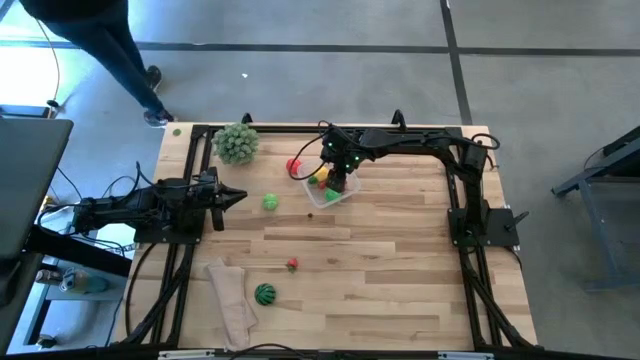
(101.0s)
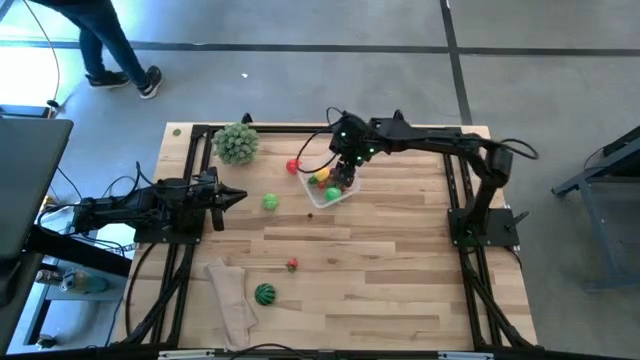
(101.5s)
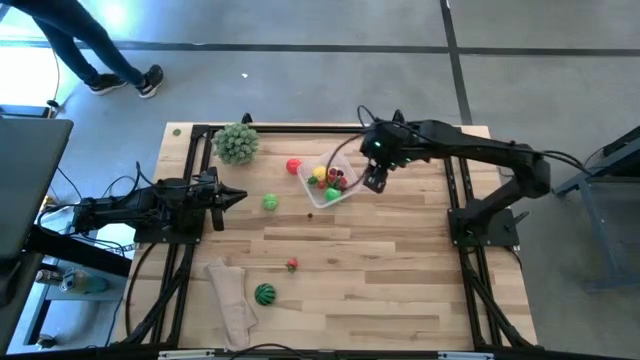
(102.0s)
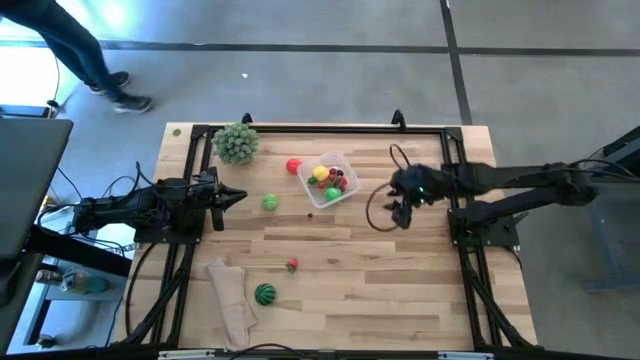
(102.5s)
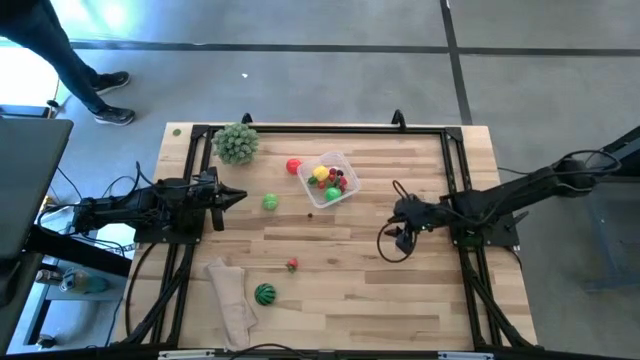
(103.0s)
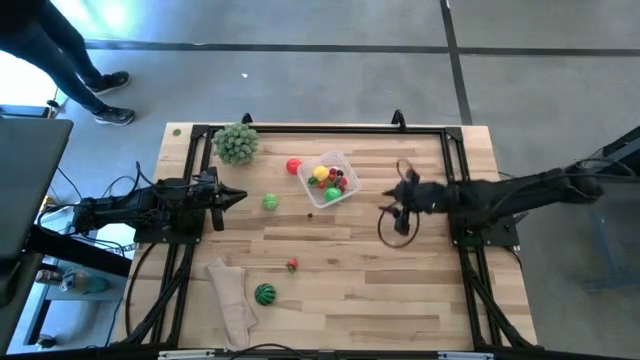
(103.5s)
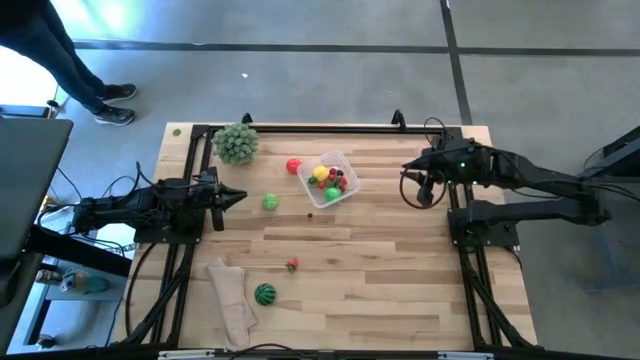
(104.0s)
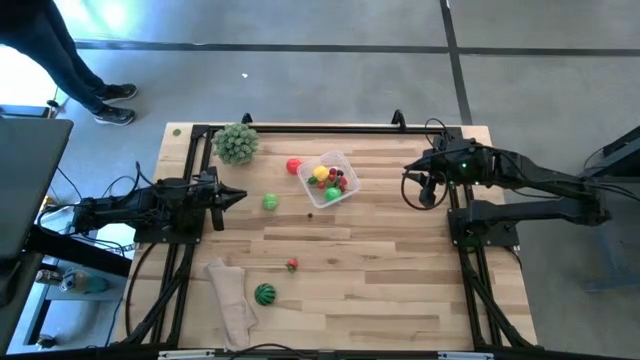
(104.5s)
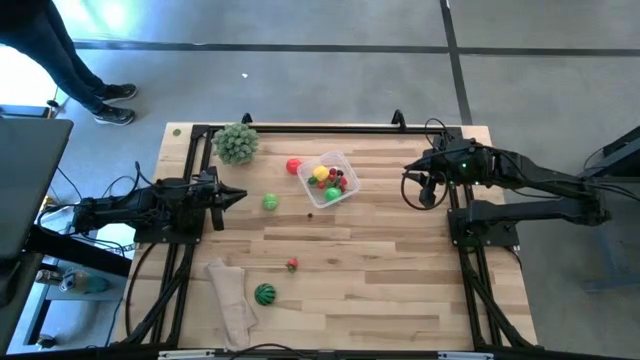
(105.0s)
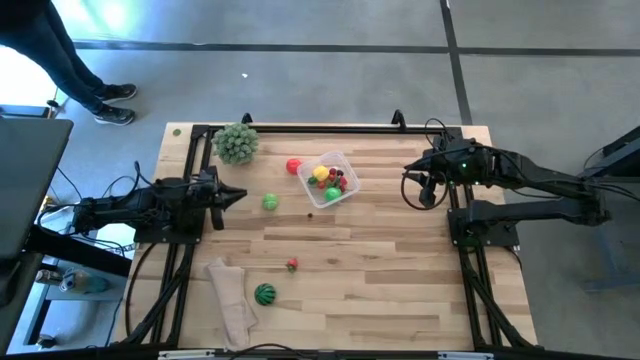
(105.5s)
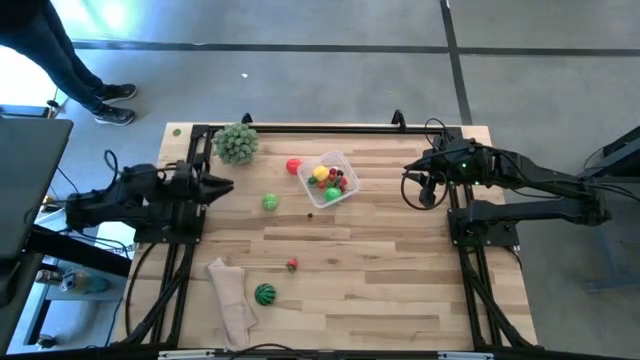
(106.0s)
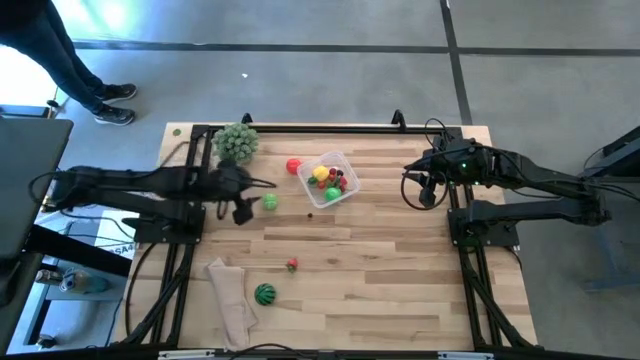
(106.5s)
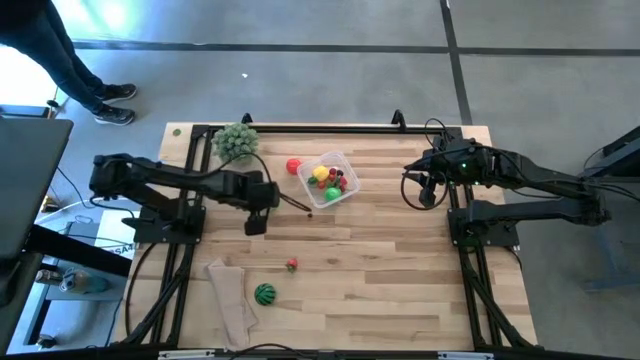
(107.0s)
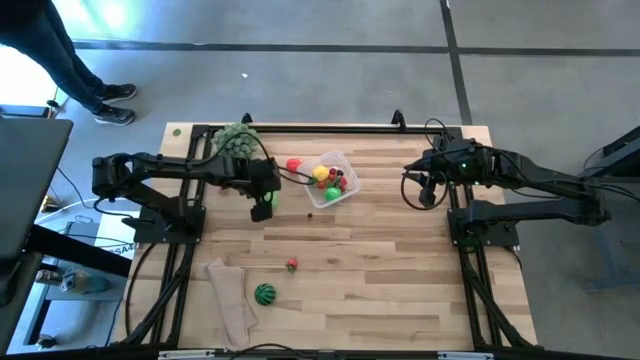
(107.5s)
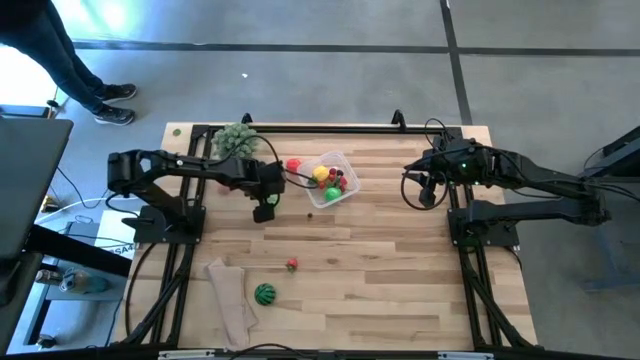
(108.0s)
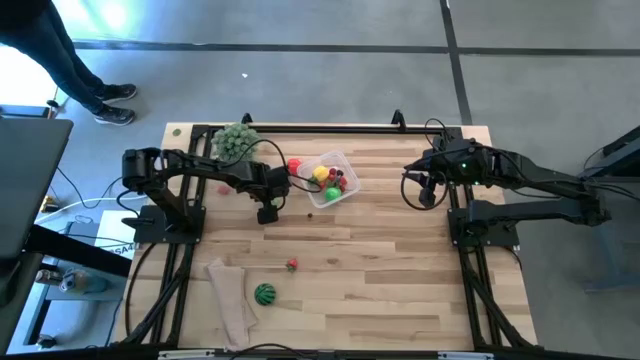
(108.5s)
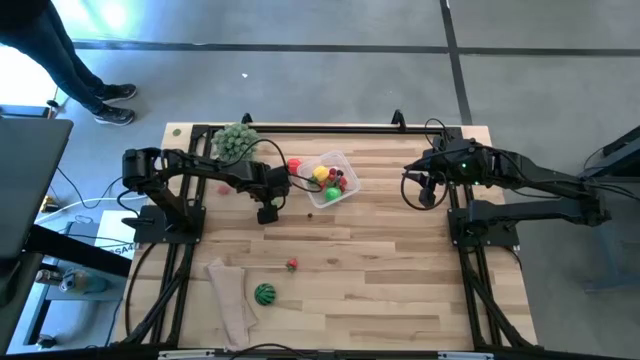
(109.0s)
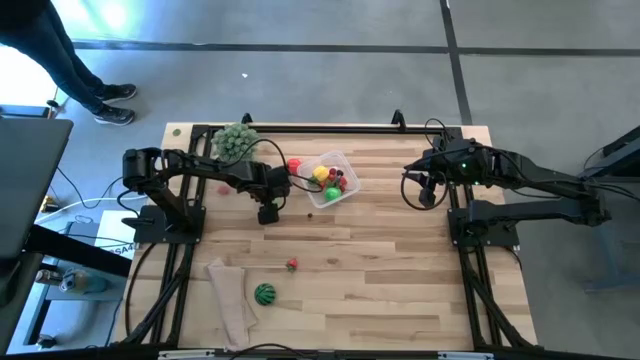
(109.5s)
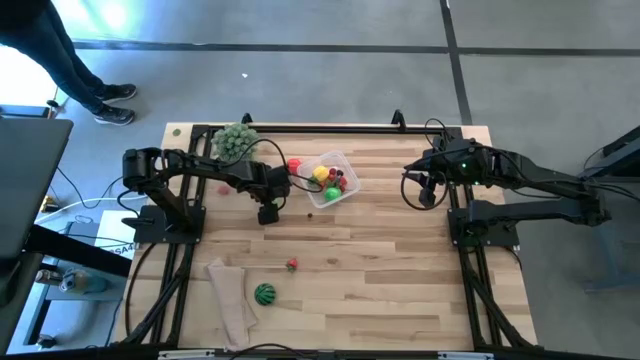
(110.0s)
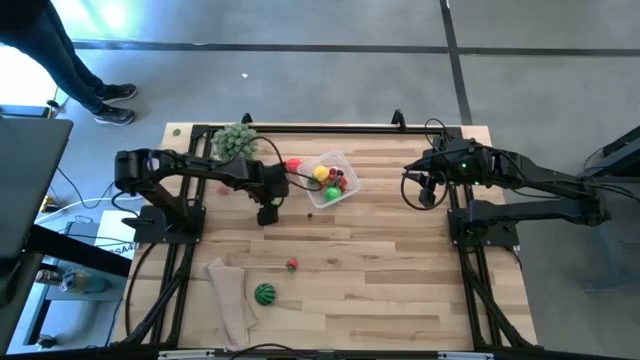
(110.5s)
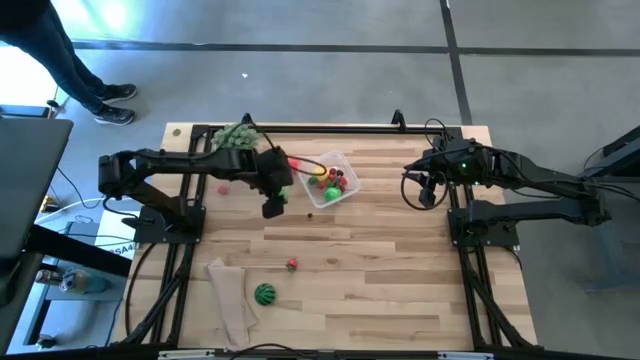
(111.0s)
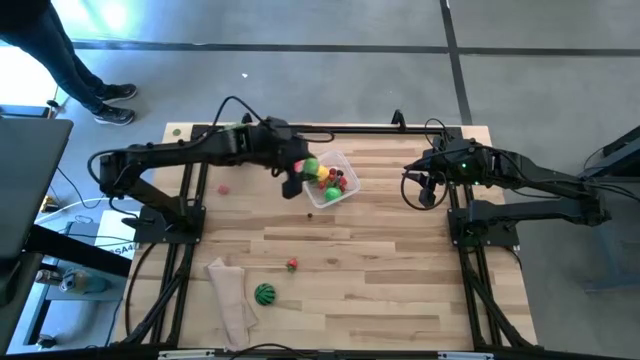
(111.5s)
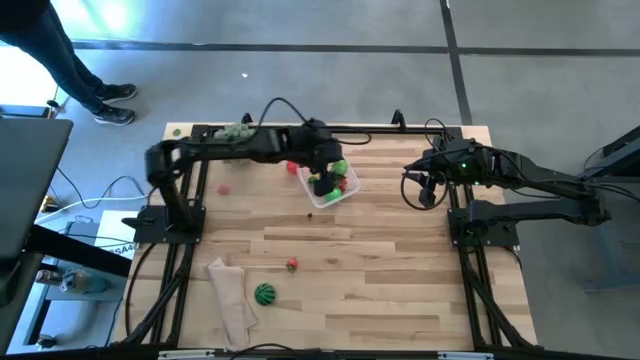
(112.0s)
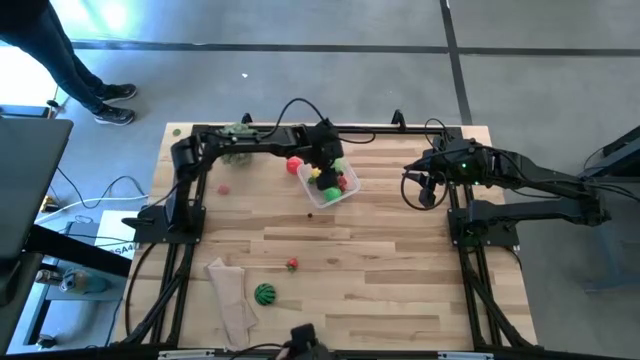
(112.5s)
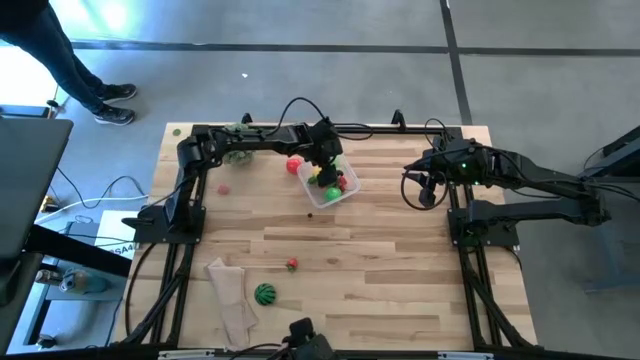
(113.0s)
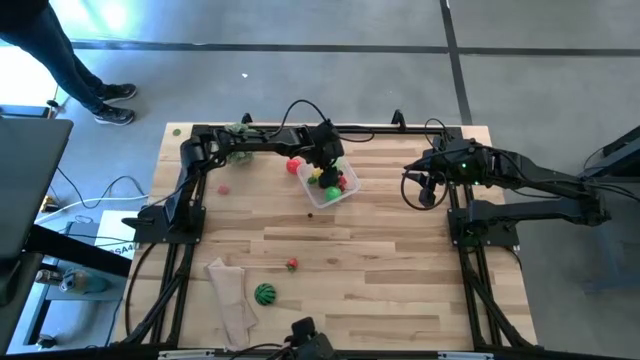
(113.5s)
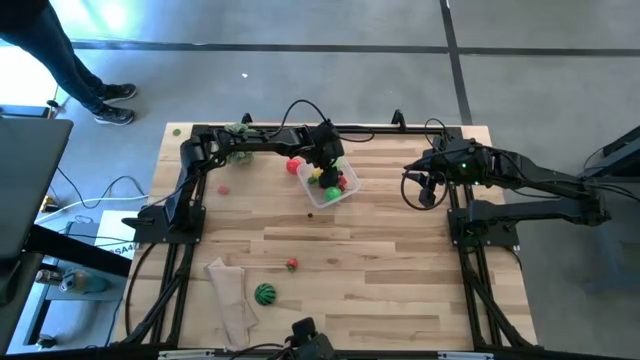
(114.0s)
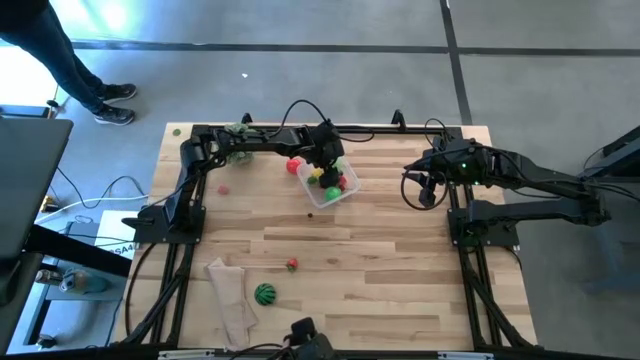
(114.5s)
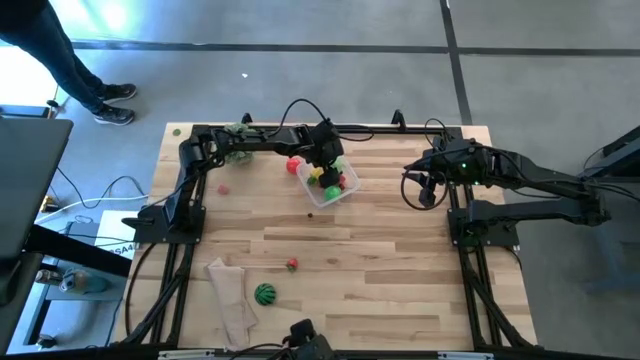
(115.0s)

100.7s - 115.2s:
Task: Pick and placing Produce into tupperware
Put the green cabbage into the transparent container

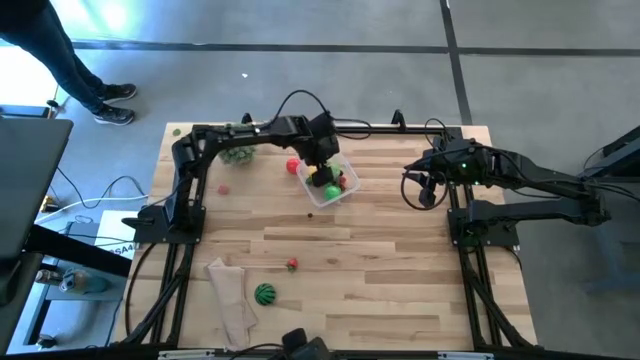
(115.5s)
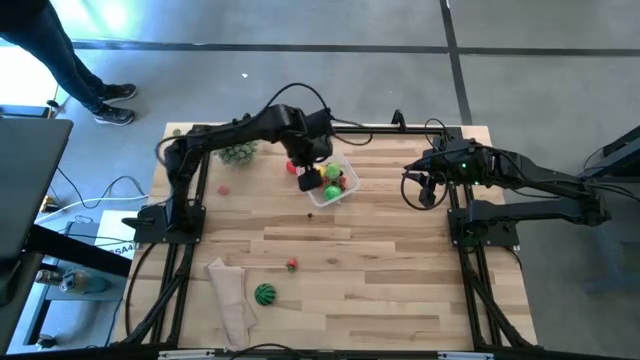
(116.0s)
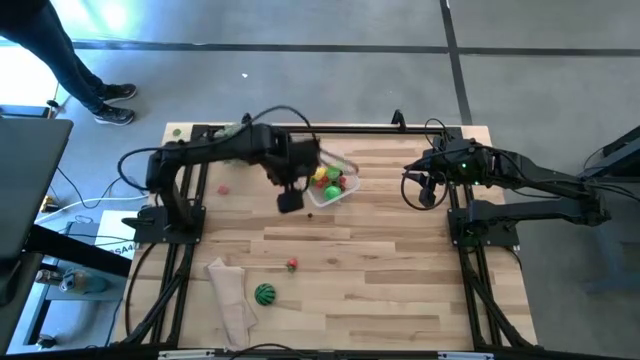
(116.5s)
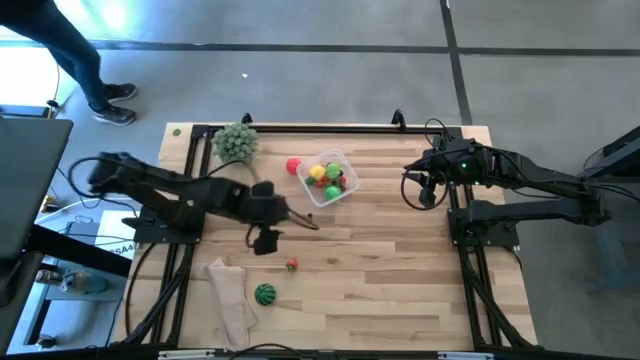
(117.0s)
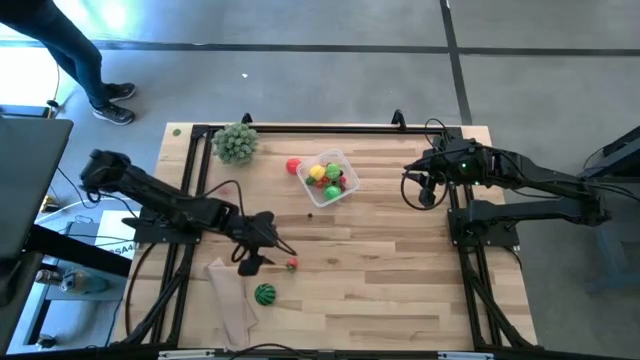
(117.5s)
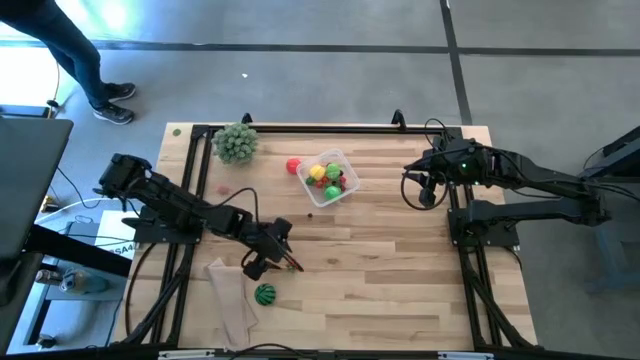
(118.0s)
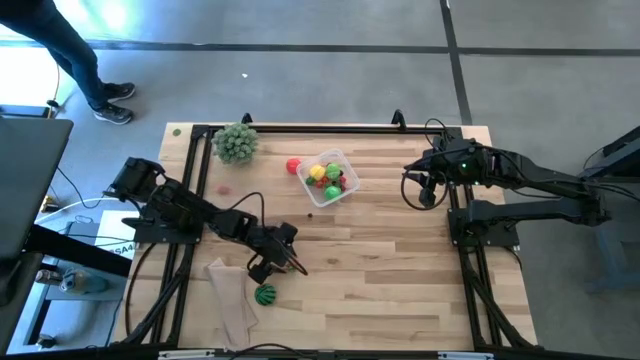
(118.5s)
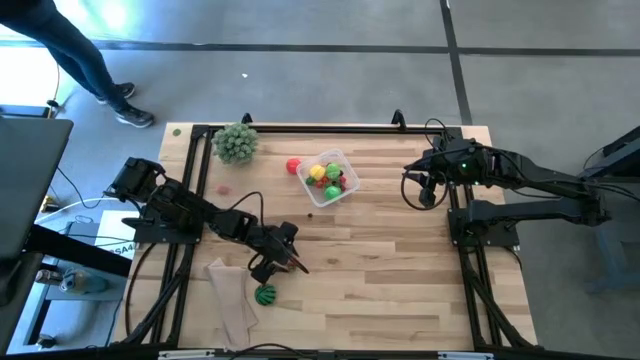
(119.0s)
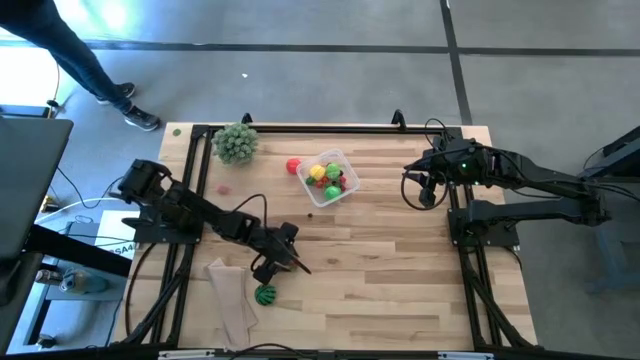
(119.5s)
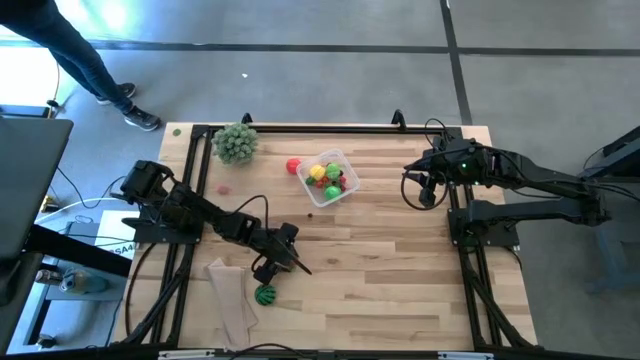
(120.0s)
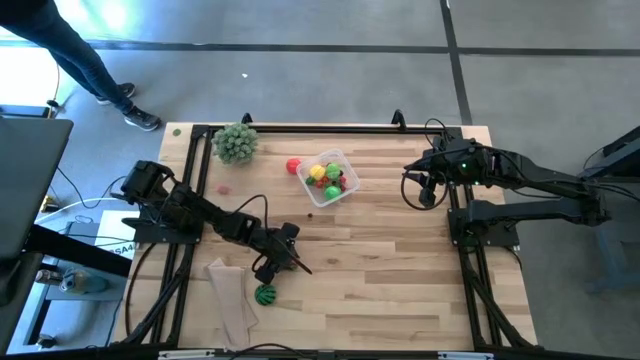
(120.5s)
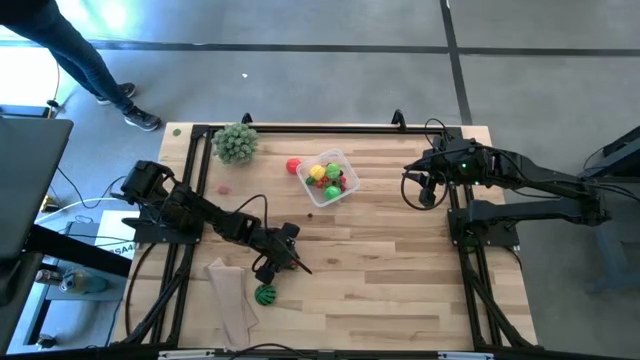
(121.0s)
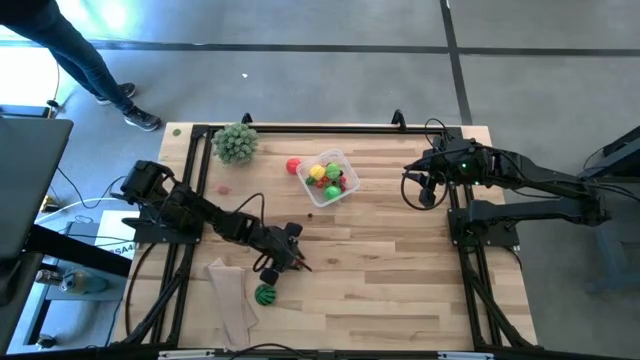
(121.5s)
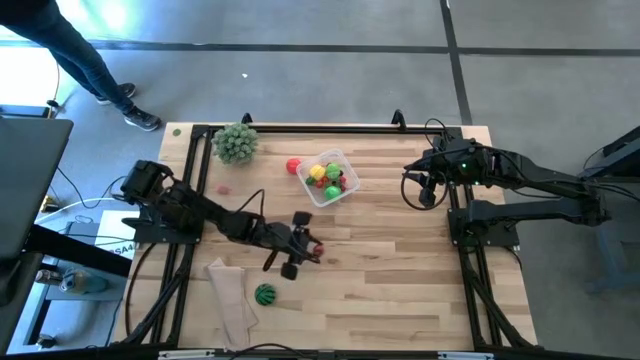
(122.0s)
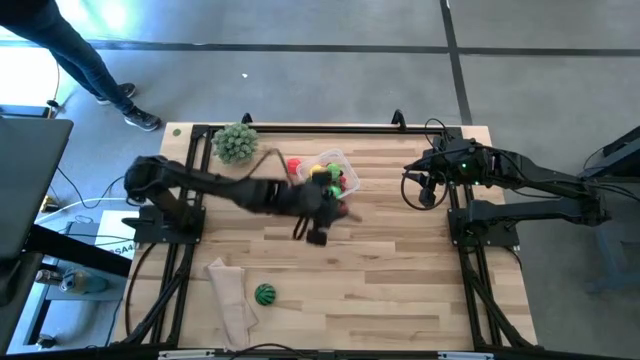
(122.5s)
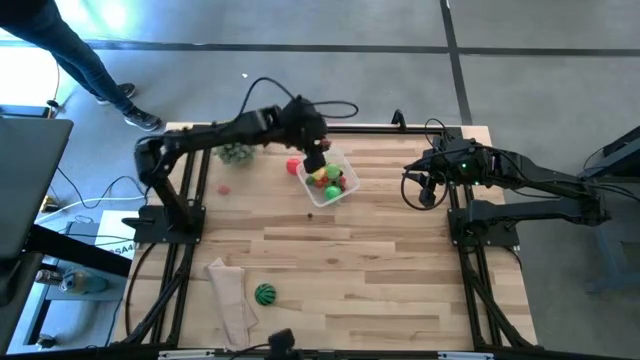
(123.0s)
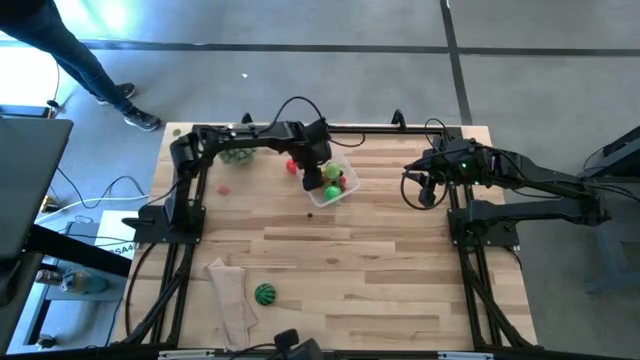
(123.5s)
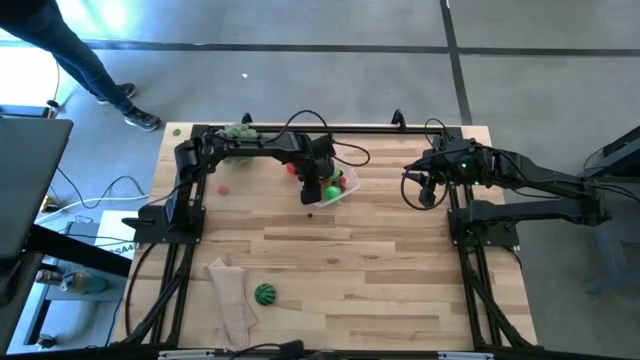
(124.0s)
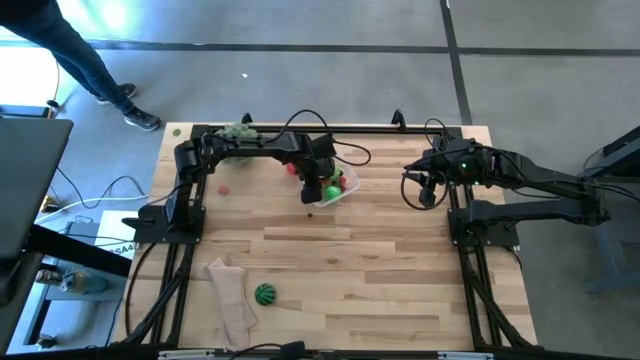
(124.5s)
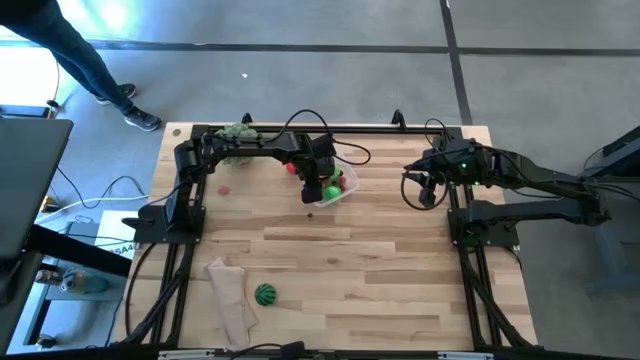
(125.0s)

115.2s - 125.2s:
Put the red strawberry into the transparent container
